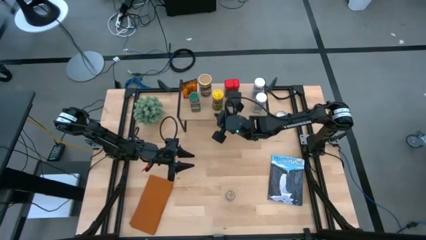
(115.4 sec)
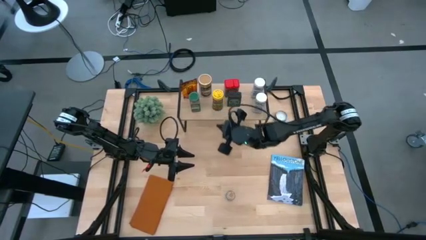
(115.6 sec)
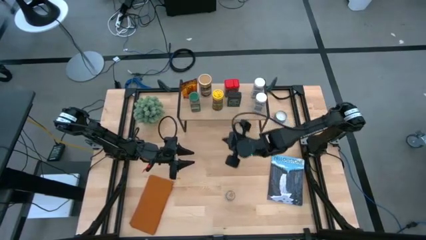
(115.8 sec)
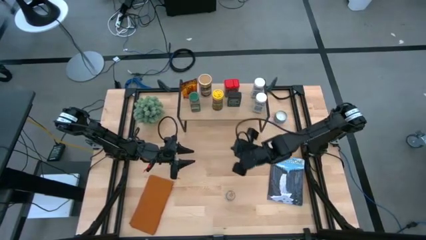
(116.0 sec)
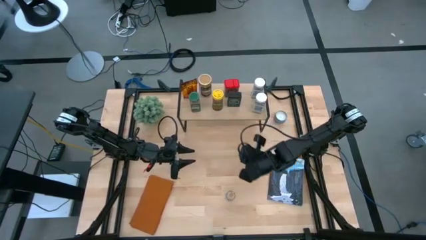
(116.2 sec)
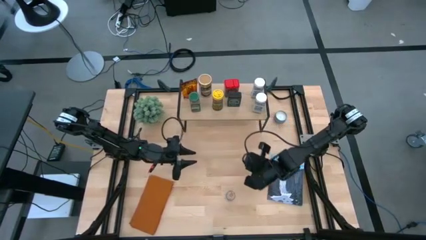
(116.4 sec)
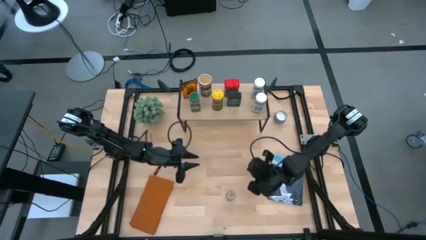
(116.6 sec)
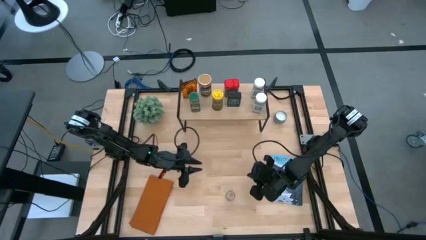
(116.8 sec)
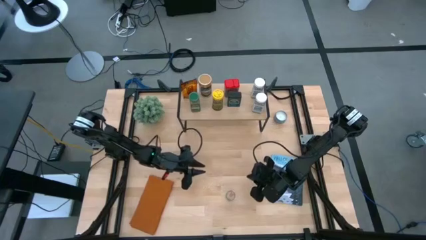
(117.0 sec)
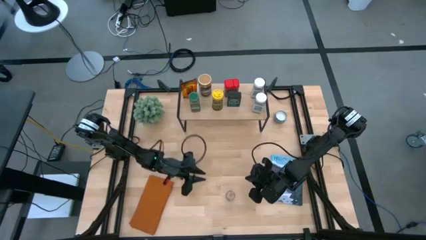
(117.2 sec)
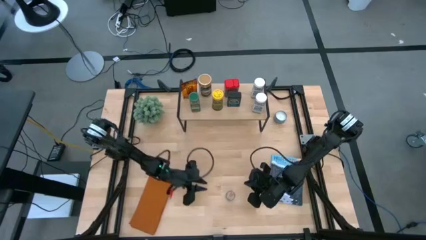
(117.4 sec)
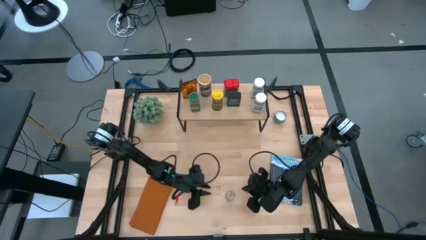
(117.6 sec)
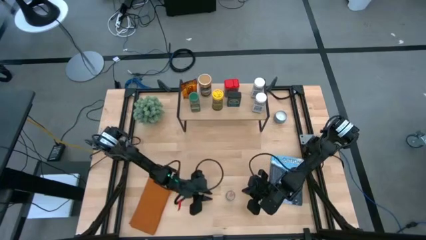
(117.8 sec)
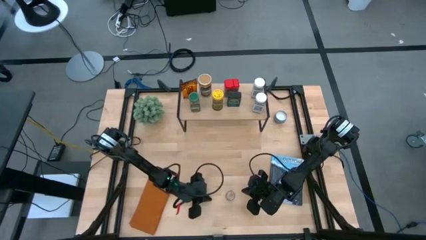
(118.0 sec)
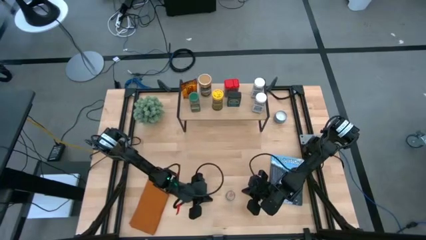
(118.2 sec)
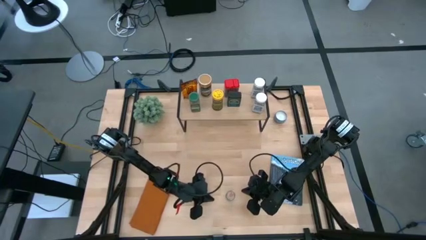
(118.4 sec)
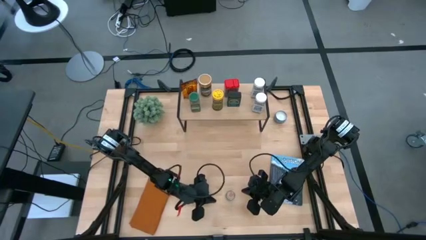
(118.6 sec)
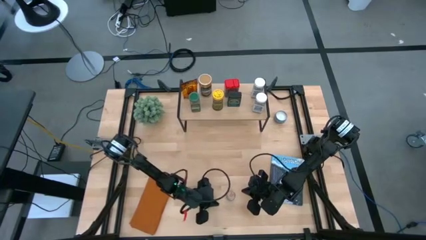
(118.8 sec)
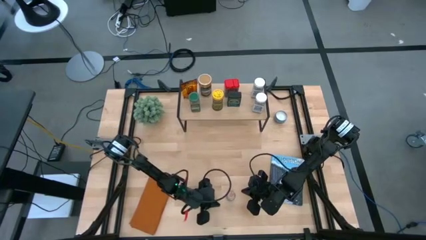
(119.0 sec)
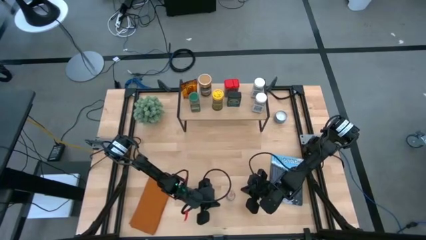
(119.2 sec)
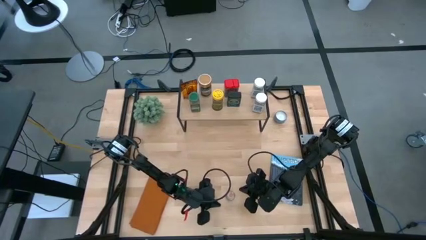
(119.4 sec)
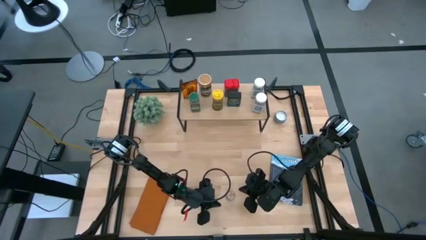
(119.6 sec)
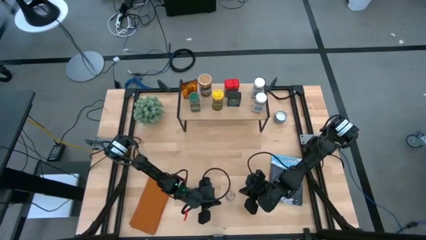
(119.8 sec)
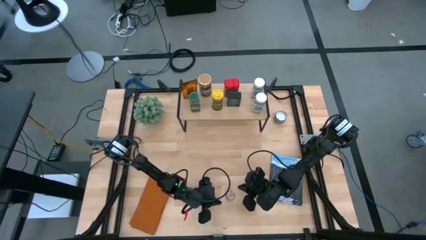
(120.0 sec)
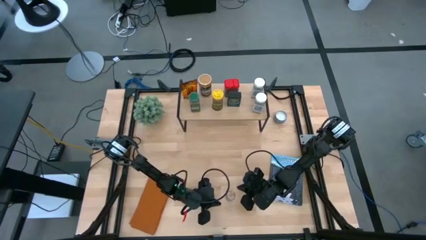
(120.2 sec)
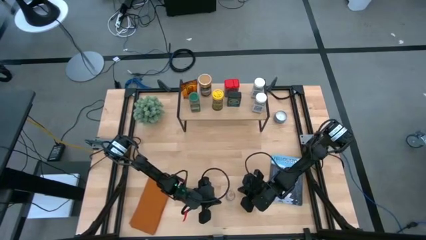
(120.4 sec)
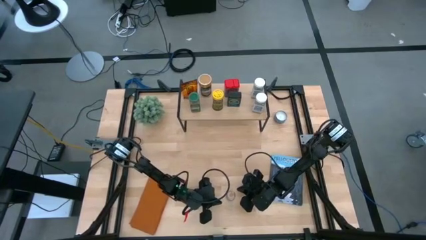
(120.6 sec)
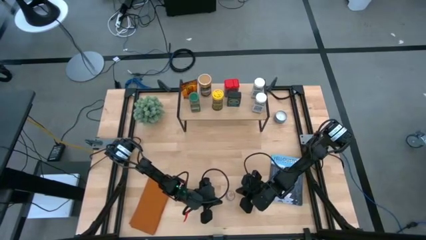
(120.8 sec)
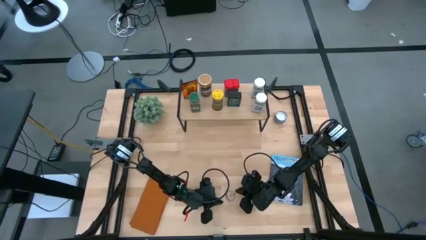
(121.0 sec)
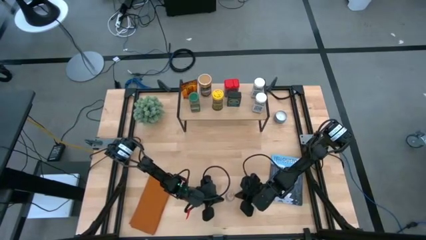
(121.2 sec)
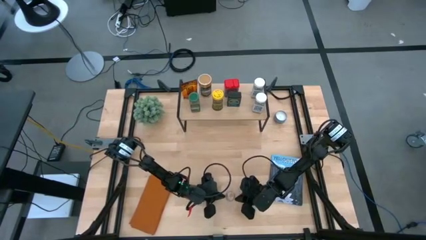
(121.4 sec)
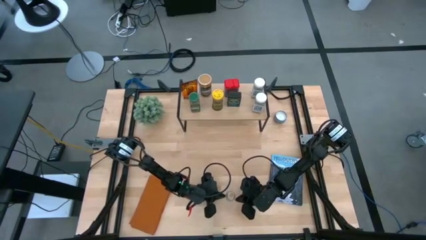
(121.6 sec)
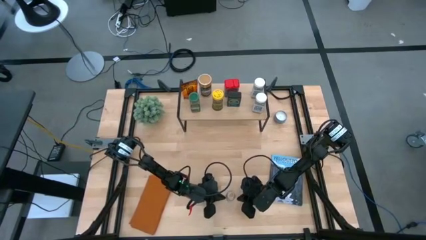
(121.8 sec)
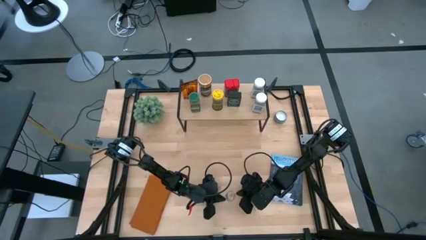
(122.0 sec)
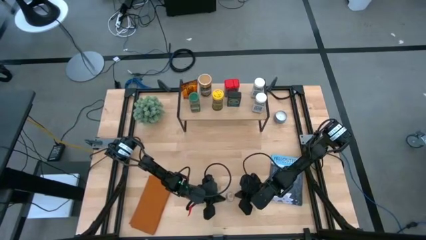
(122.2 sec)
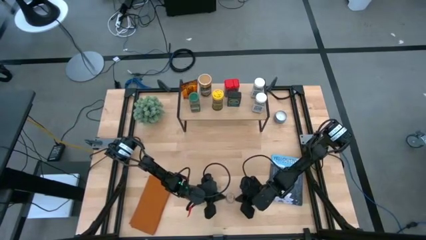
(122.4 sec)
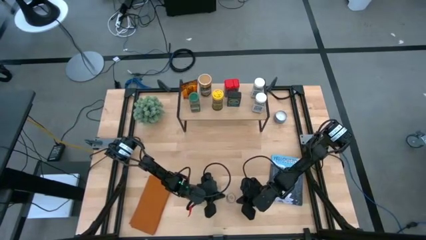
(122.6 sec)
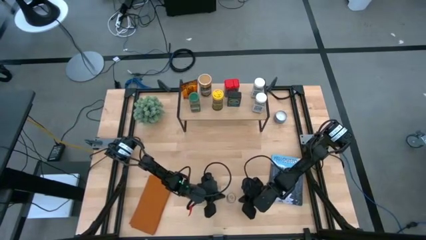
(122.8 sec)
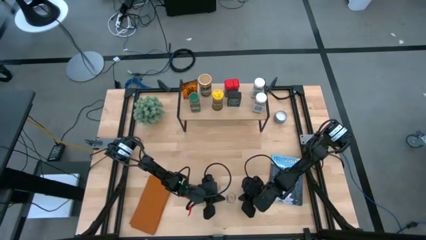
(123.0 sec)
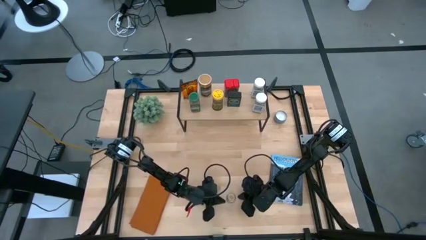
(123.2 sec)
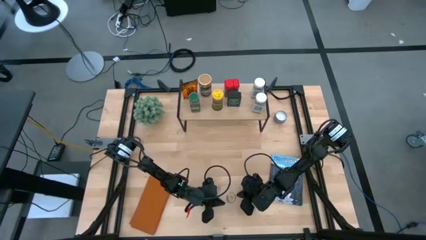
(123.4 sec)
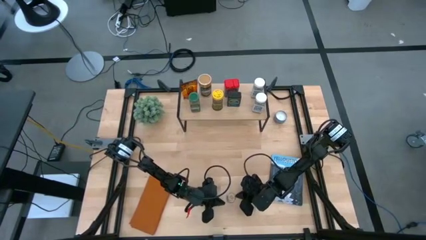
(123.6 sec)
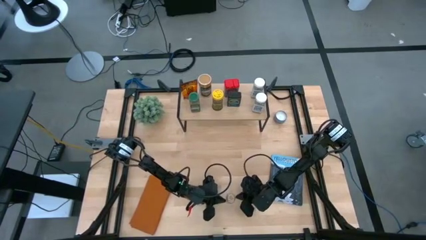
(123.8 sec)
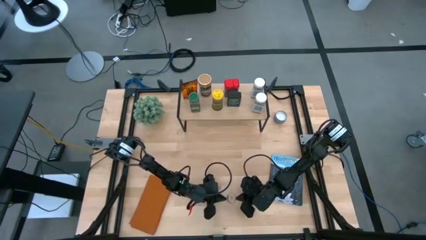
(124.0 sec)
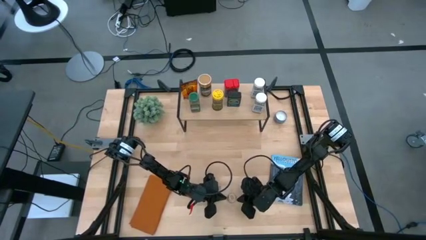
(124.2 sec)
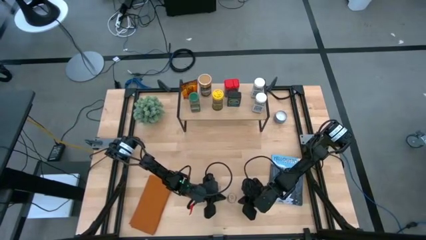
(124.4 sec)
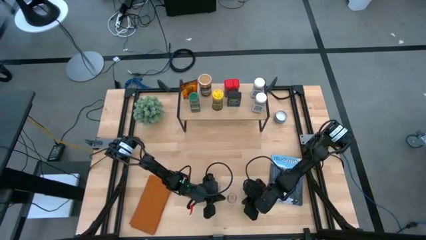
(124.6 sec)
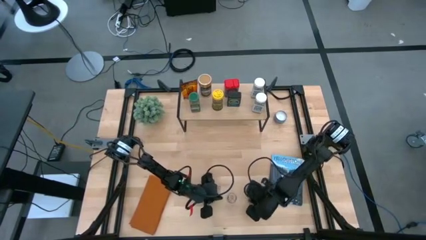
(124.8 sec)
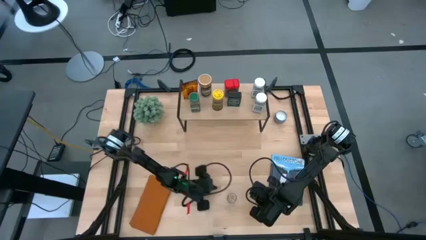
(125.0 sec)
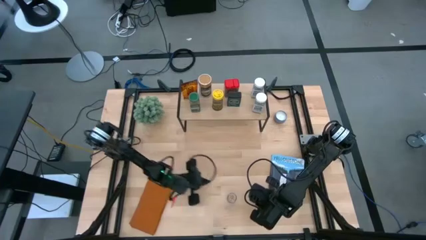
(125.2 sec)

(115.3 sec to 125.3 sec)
Task: Shelf spices
Put the brown seasoning bottle on the shelf
